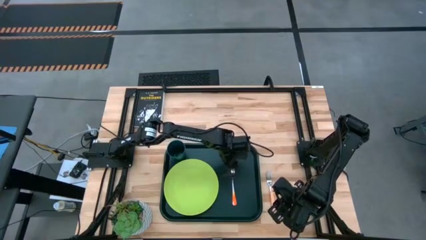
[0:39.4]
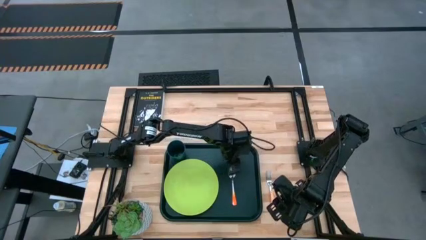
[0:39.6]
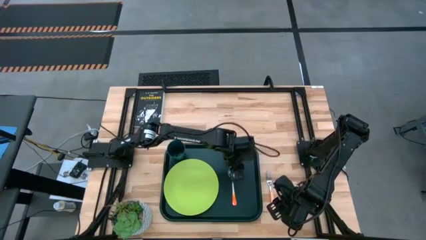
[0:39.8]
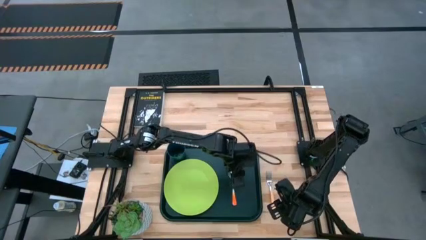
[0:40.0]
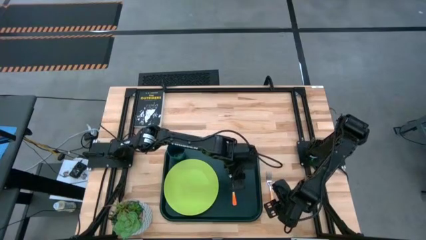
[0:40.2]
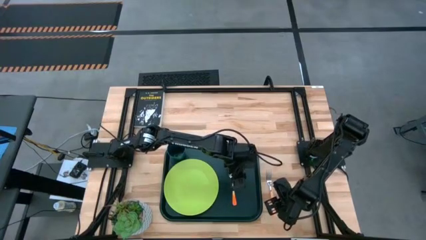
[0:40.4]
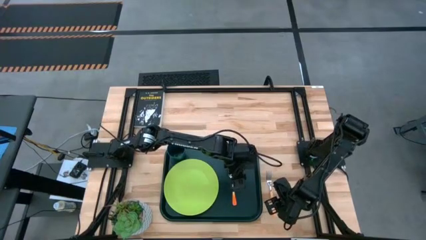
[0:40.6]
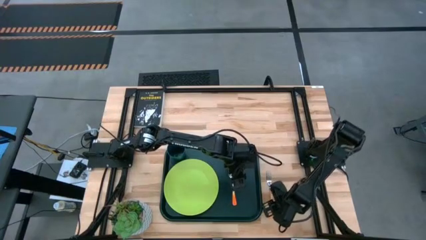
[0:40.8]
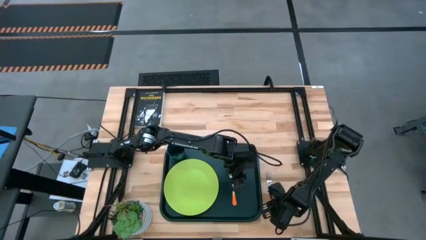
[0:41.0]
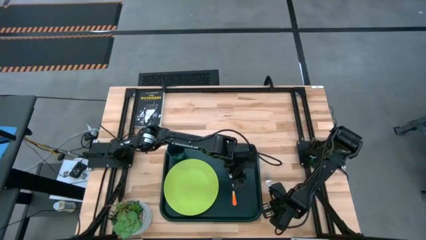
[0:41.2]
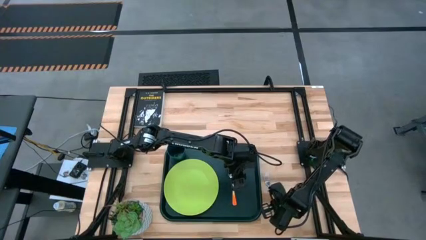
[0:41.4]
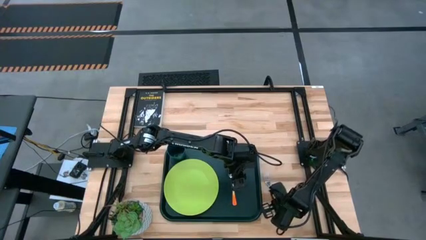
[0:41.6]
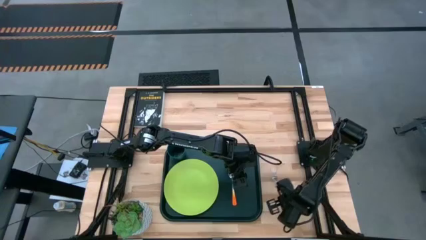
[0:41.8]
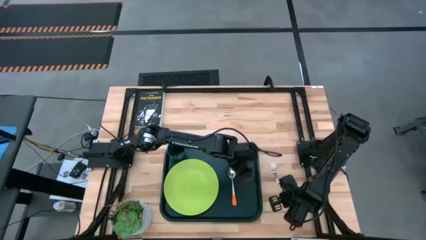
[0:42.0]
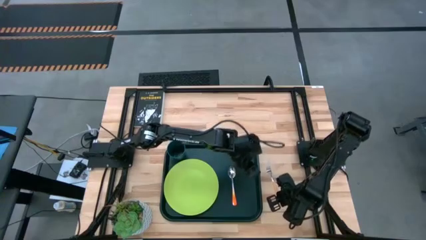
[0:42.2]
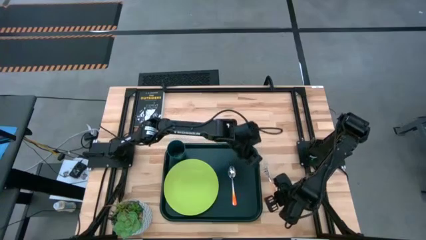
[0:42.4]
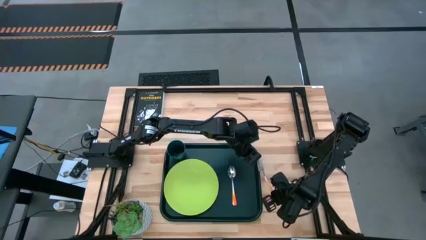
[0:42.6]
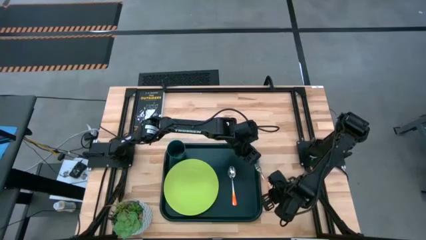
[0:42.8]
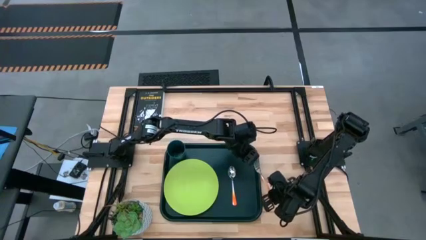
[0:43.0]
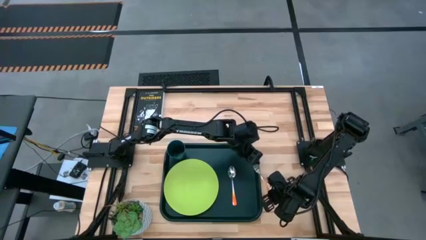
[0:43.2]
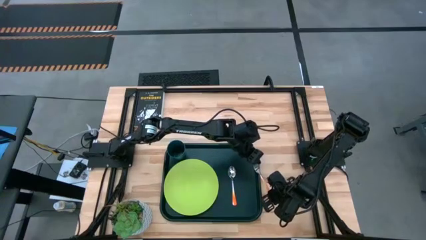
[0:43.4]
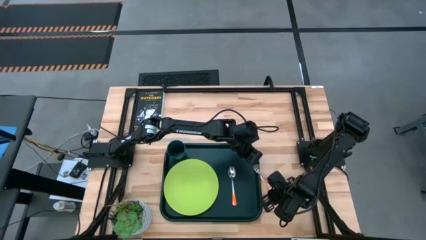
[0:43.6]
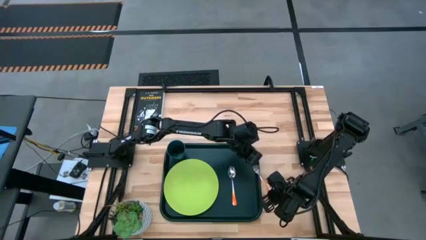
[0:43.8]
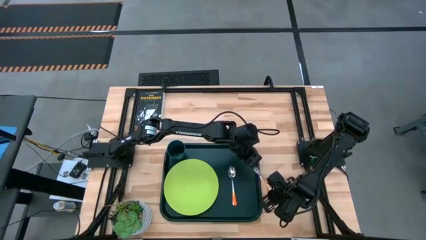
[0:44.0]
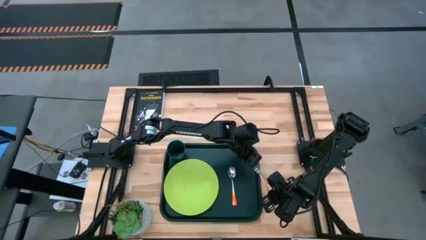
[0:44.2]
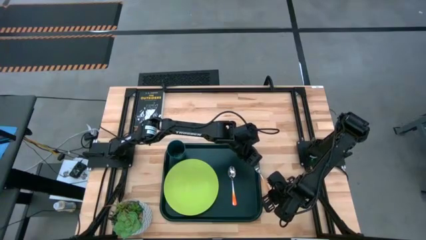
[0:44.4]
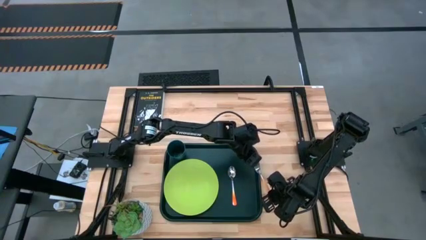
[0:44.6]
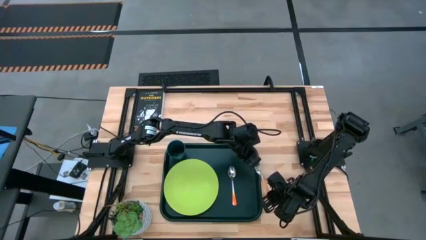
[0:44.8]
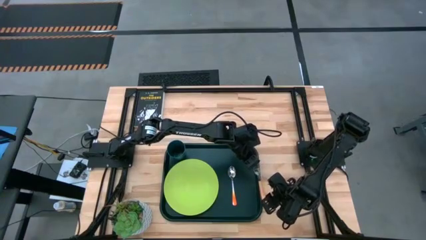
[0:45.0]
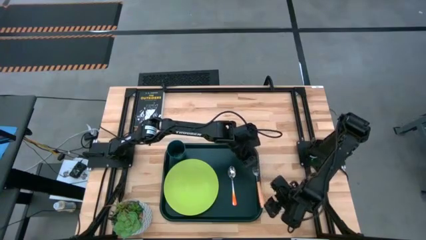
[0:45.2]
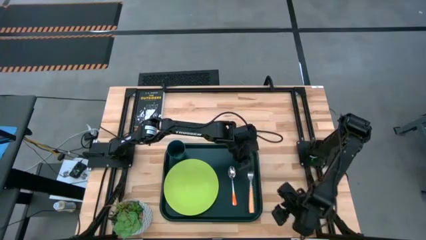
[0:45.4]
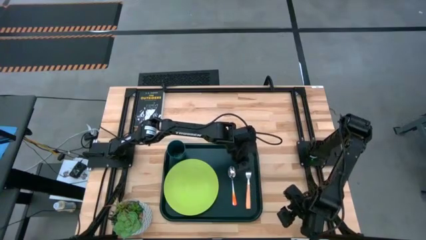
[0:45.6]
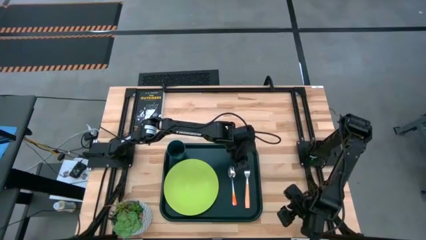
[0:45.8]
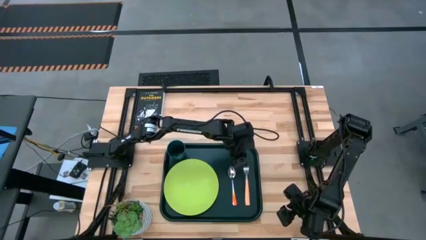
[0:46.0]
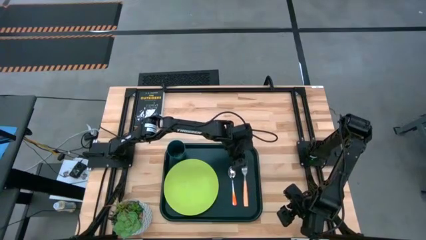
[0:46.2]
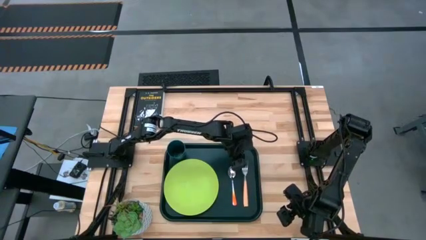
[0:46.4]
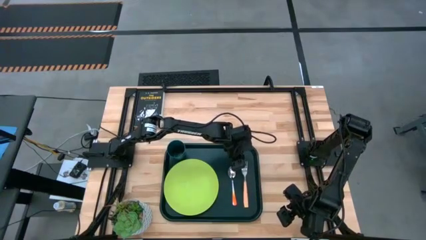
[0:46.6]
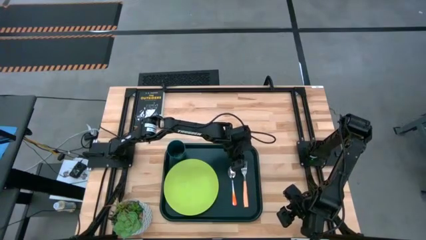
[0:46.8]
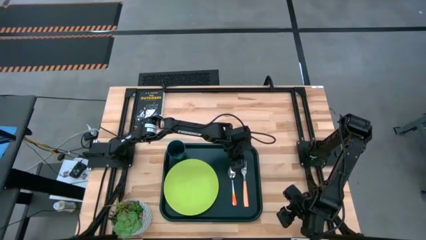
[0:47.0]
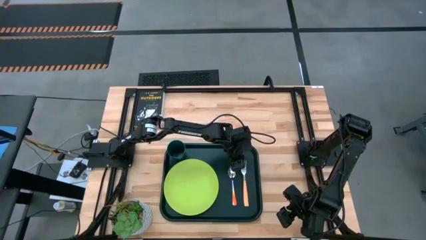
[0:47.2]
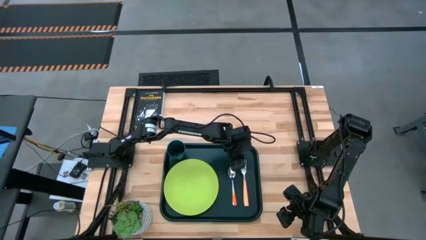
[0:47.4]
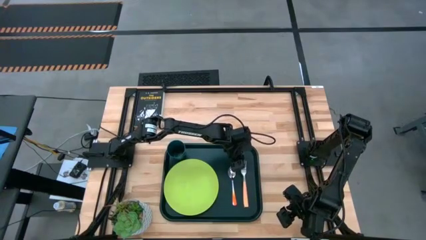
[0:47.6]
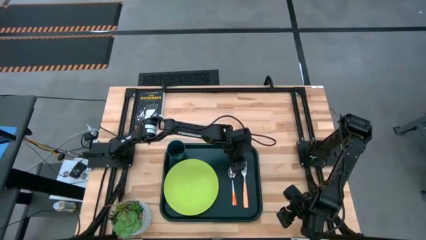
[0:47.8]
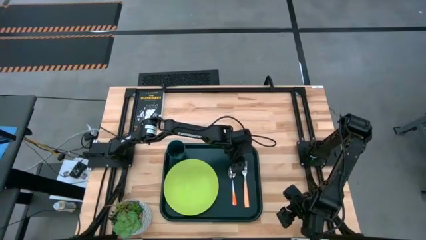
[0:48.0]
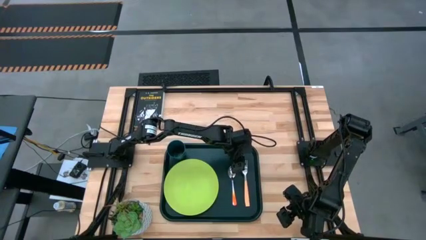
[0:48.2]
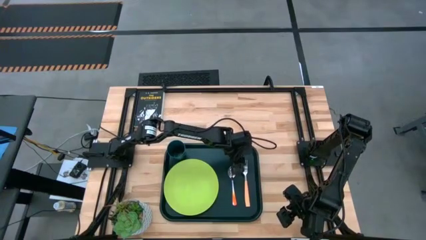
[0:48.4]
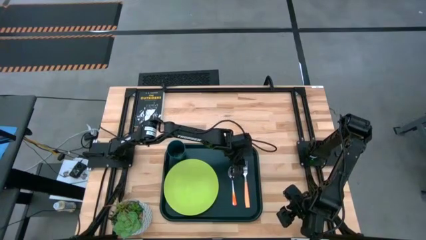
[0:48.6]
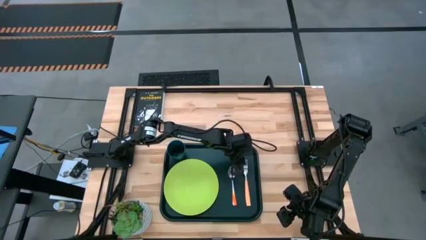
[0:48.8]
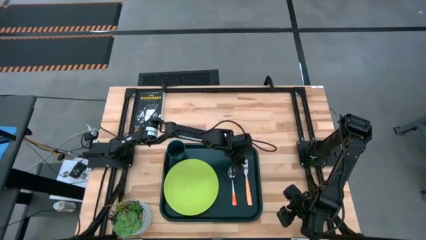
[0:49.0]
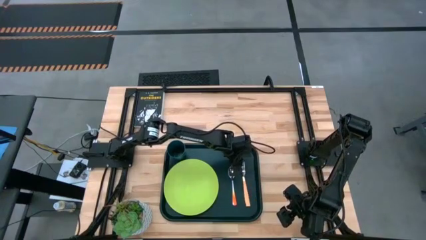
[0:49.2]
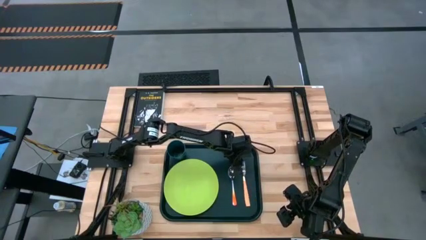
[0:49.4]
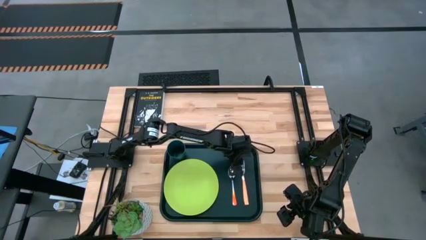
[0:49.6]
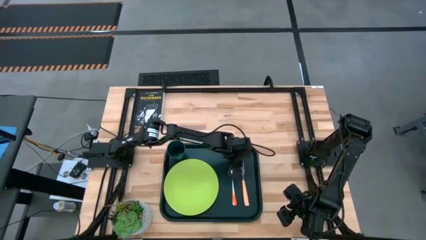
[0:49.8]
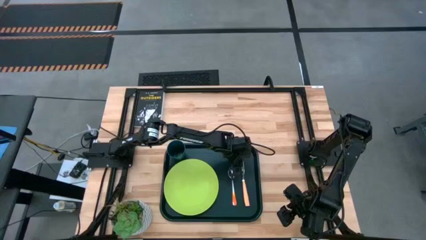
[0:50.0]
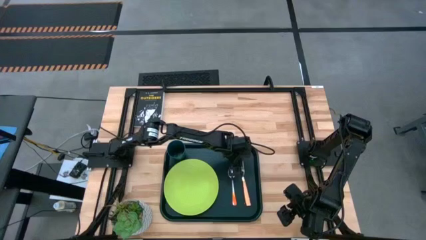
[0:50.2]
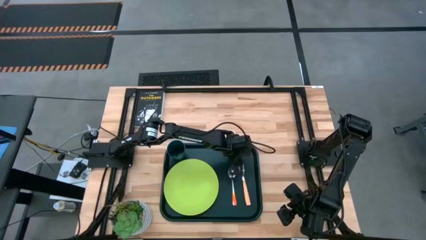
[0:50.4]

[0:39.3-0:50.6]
Task: Pick and place plate/cup/fork/spoon on tray
Put the orange fork on the black serving tray
